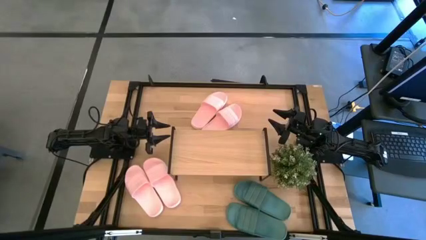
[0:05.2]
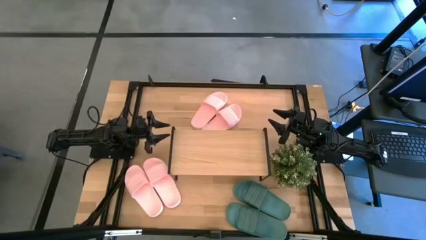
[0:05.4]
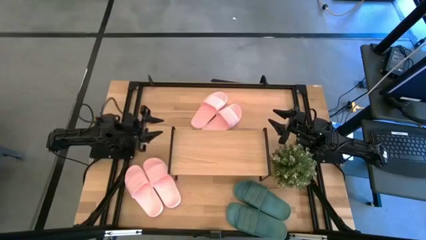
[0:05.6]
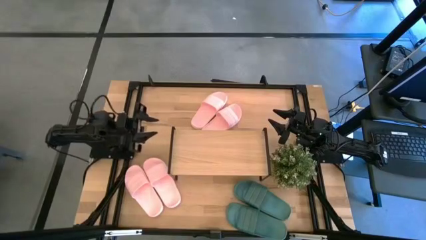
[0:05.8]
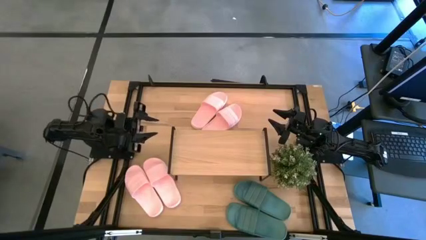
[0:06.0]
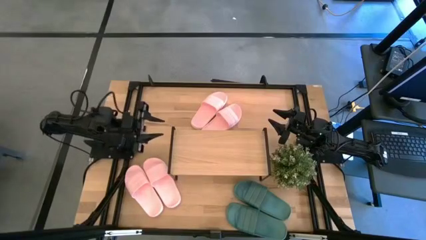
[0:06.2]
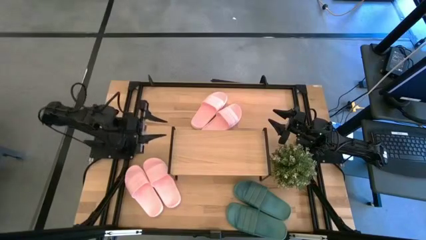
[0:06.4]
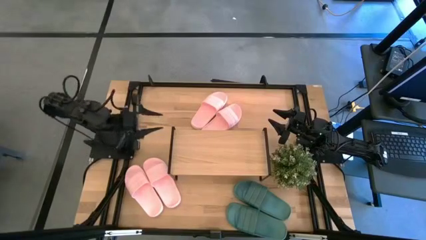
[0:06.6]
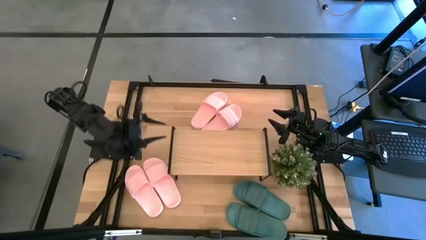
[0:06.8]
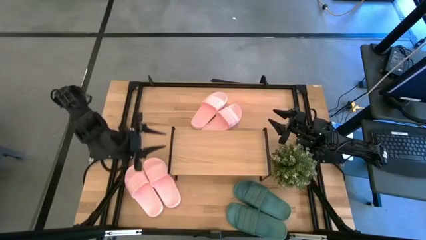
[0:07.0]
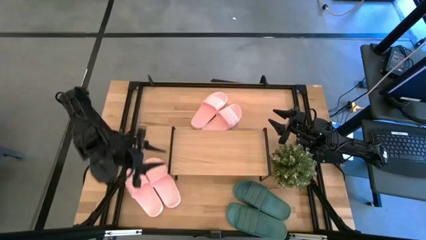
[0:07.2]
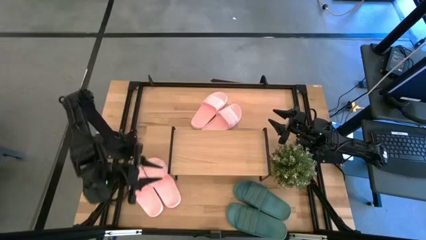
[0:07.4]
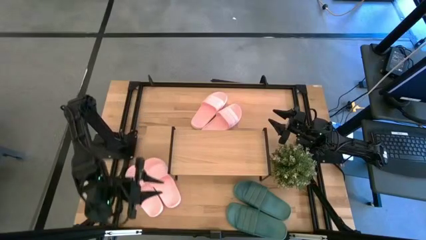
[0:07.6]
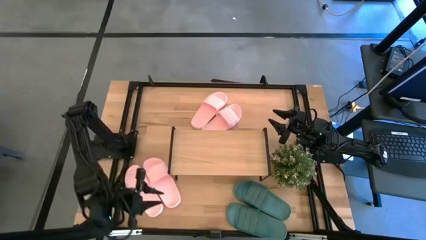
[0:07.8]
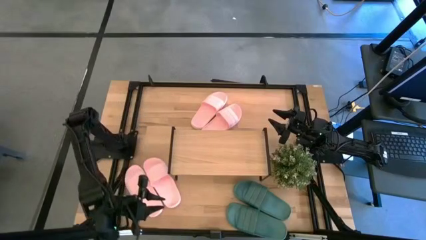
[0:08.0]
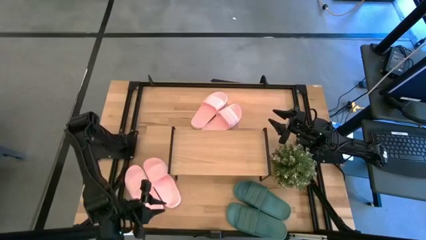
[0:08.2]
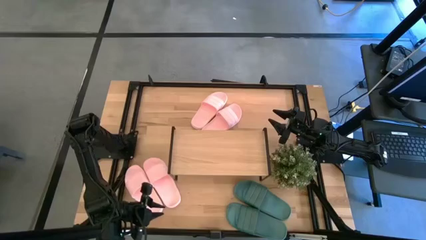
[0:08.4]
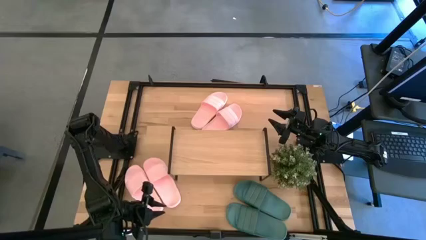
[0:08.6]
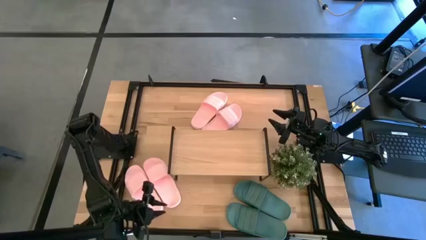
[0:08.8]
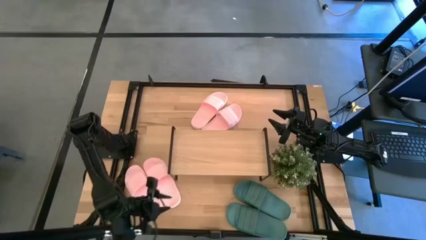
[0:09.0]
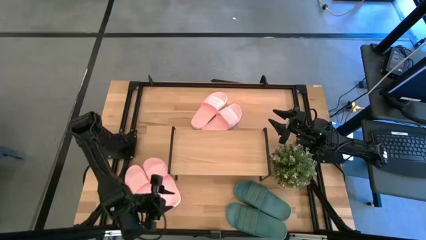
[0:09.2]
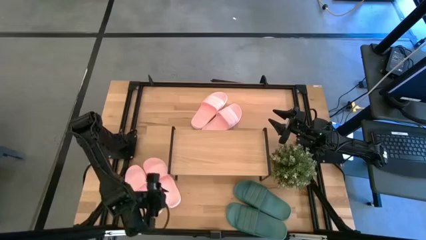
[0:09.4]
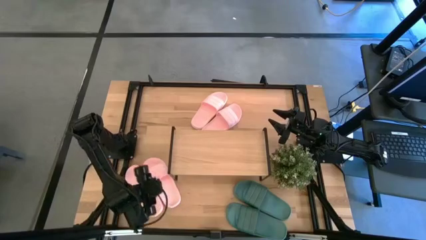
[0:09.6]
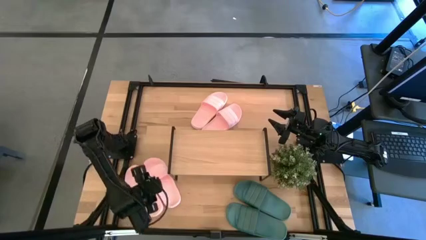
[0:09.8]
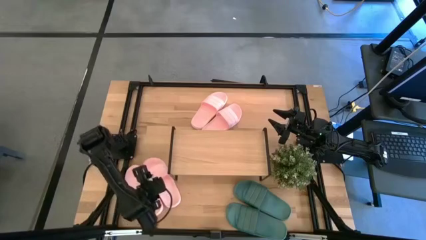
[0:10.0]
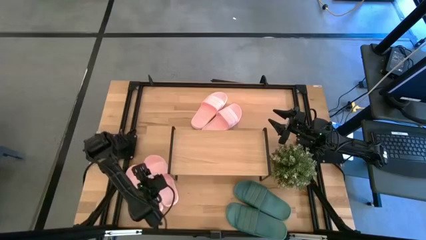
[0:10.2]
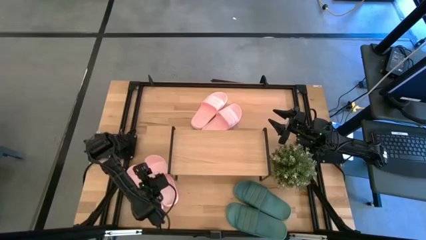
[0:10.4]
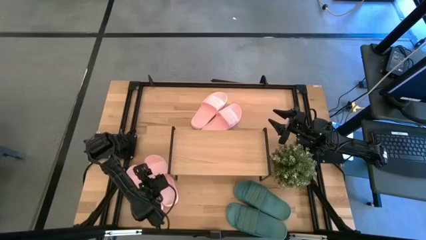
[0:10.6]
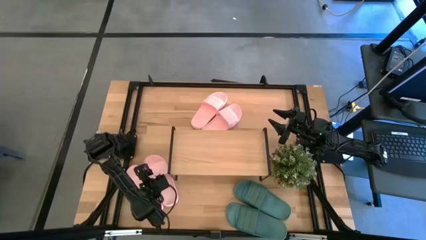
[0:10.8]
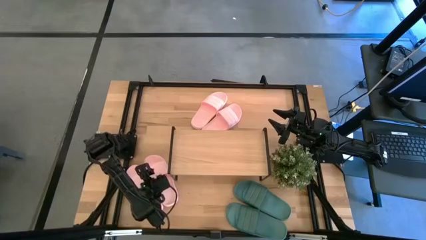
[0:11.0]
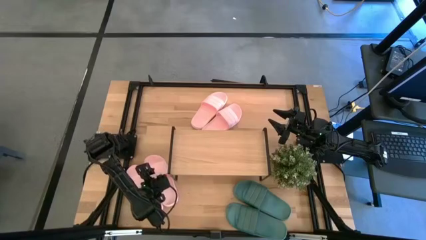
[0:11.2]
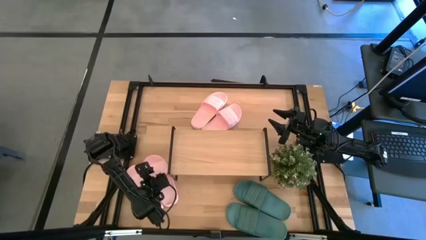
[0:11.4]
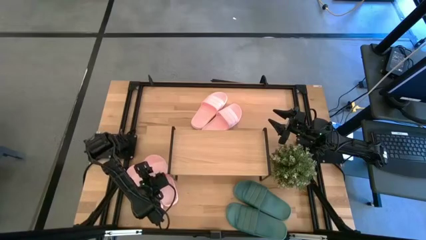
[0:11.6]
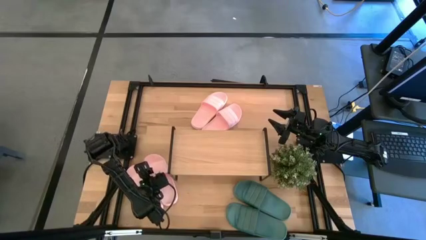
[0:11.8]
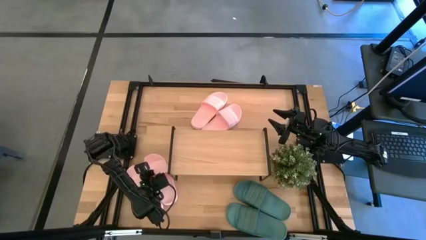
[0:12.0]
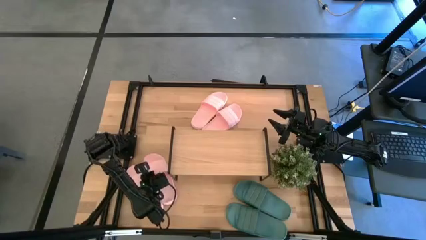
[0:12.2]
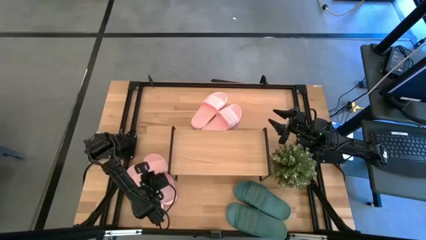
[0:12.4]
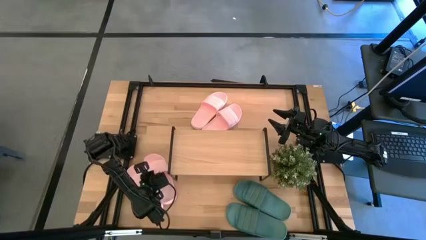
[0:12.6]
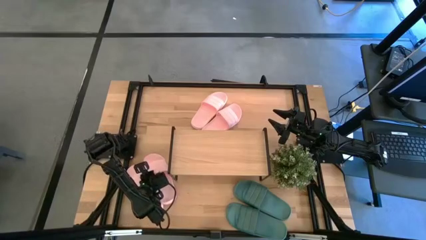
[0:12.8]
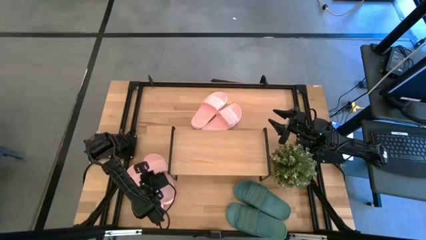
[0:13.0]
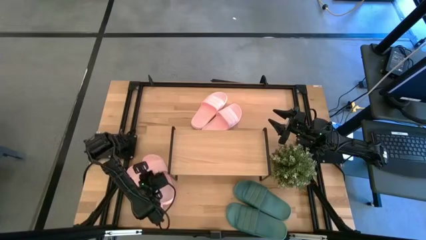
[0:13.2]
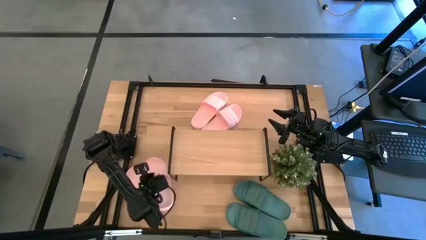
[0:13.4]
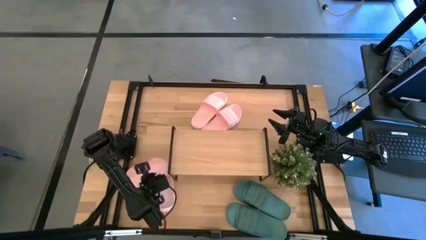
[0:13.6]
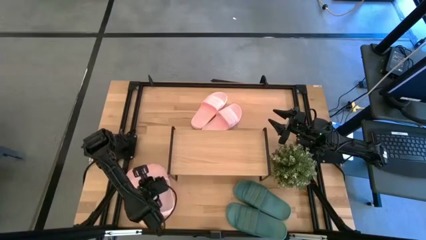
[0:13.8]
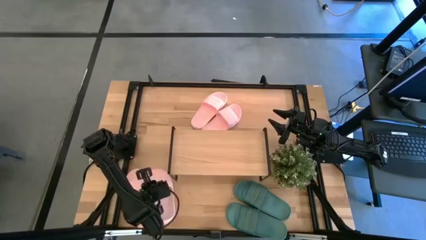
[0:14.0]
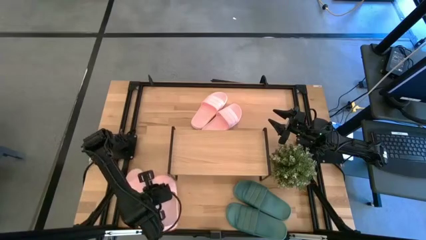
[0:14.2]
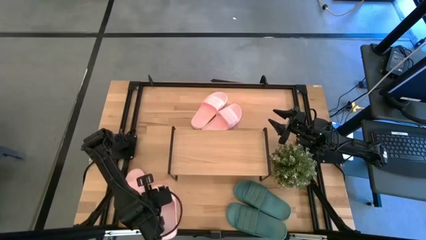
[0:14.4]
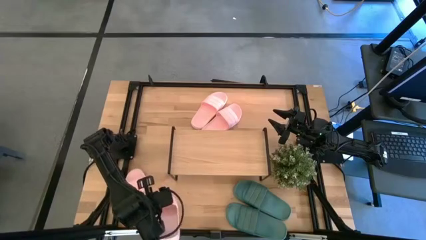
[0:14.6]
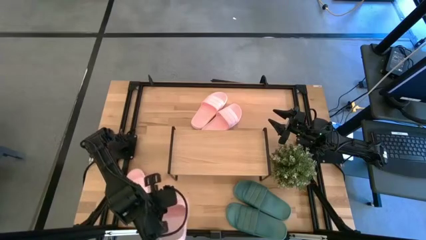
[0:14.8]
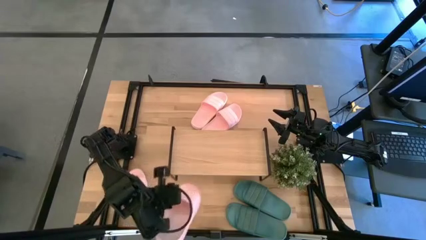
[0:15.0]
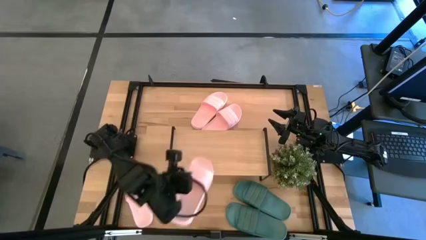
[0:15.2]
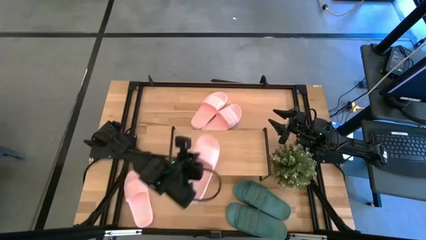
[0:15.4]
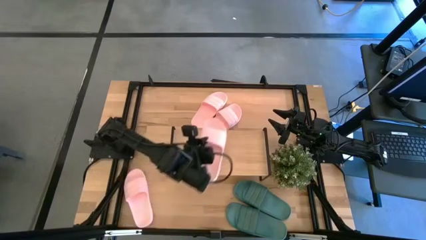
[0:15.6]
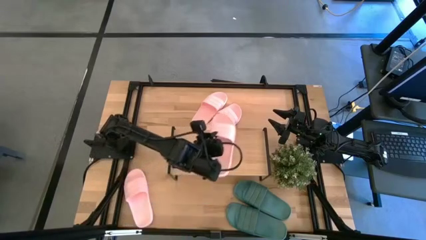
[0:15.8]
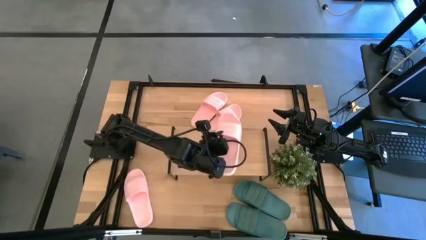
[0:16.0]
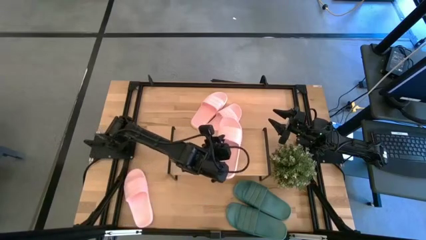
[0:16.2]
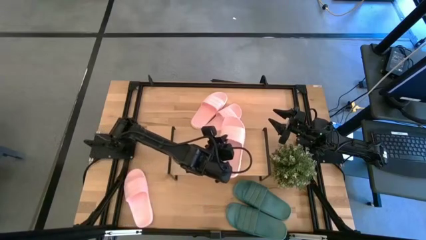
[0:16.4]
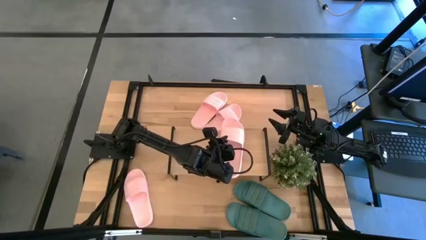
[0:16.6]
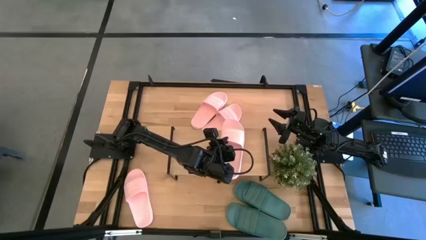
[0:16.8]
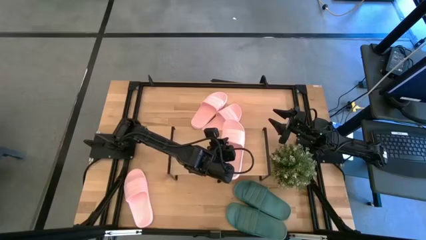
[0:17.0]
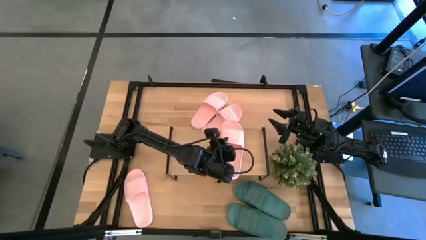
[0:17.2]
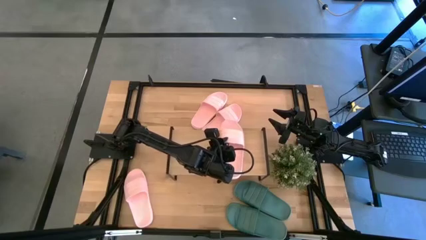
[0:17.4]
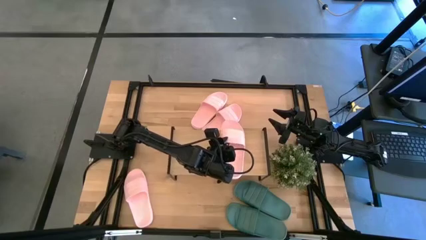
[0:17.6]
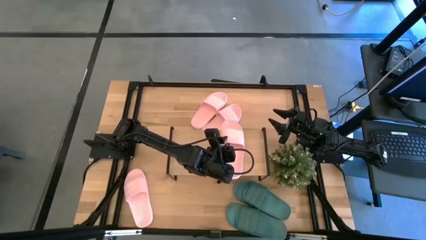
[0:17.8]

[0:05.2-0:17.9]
Task: Pick and place slides into the shelf
Put the pink slipper on the shelf

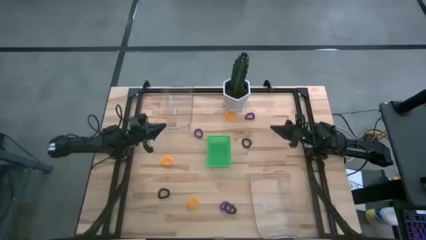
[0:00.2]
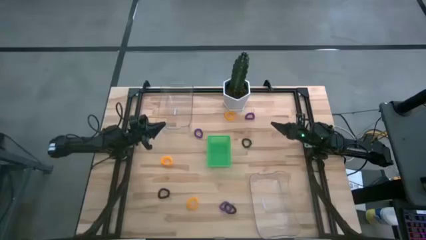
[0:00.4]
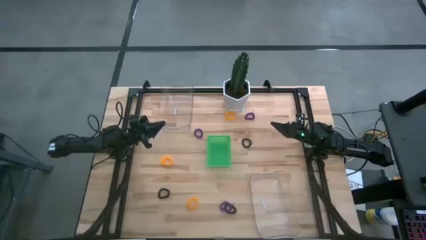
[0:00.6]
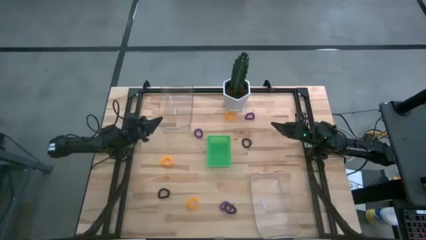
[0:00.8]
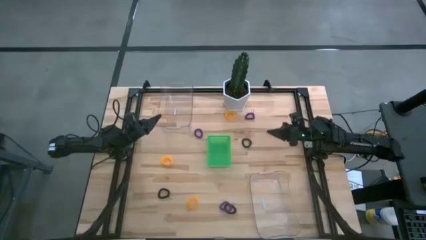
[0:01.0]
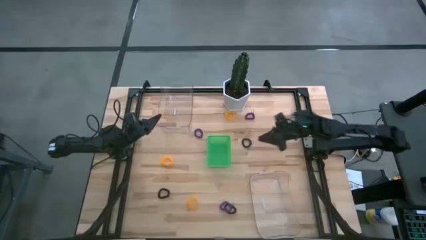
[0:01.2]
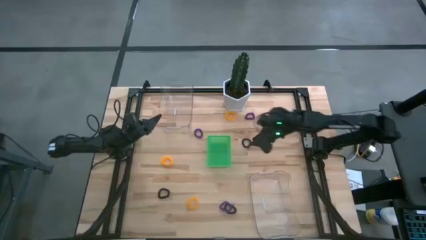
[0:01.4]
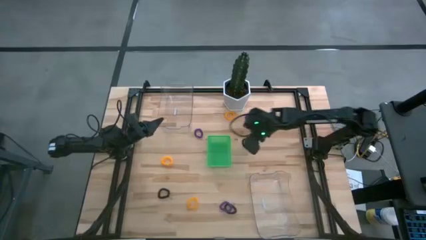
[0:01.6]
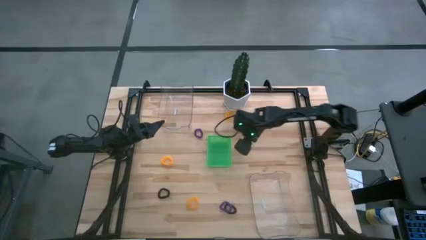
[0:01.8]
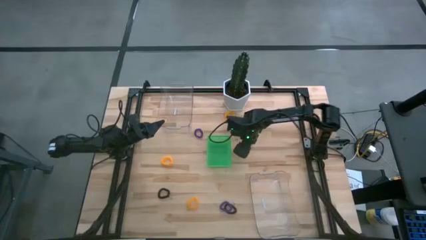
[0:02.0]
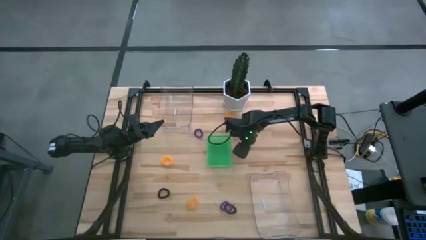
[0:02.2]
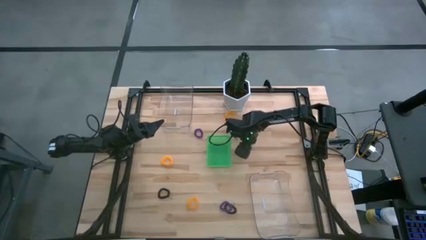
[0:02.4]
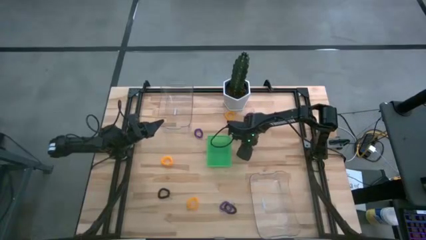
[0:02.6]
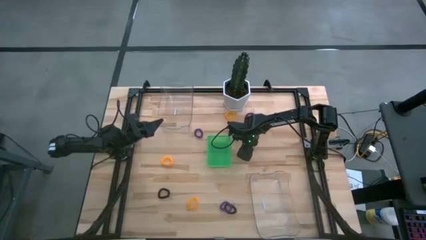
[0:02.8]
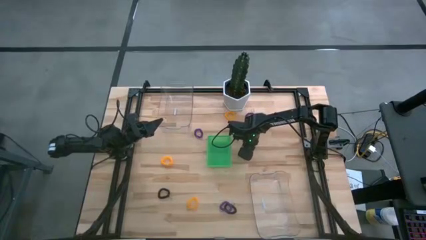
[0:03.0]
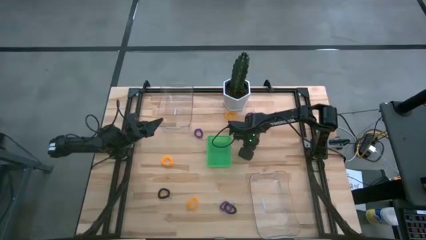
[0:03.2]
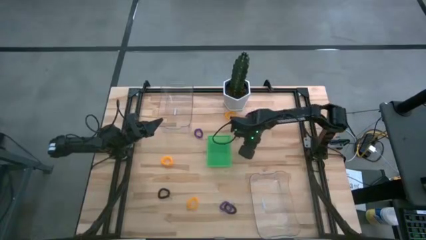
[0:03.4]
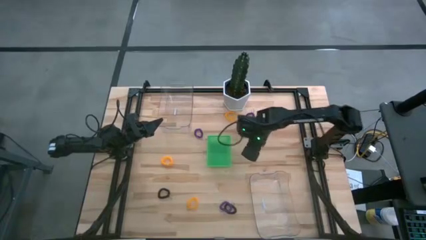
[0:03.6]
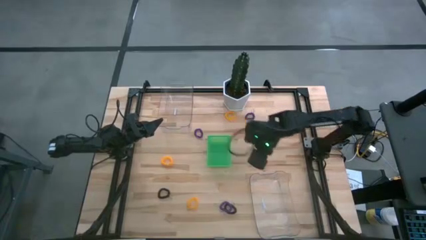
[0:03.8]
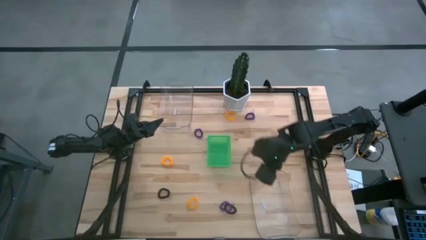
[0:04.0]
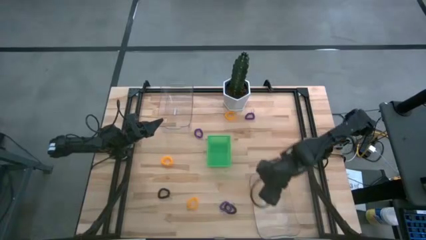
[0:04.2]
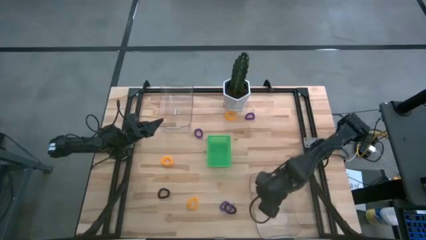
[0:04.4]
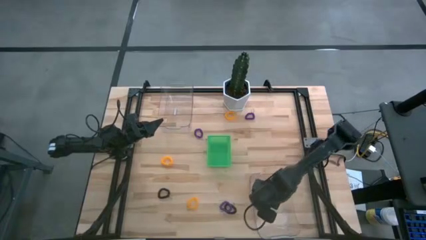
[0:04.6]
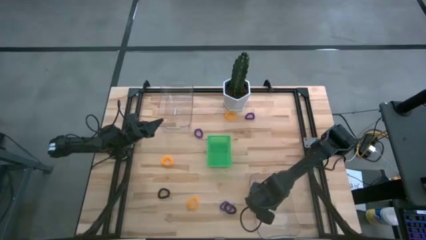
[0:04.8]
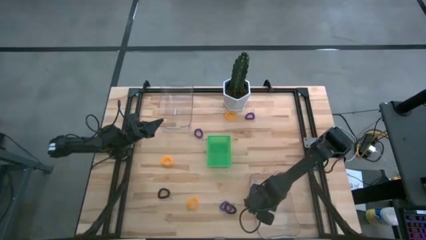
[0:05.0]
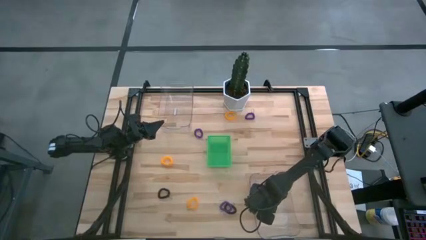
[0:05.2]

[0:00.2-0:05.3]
Task: Sort spring keychains
Put the top black spring keychain into the bottom transparent bin
